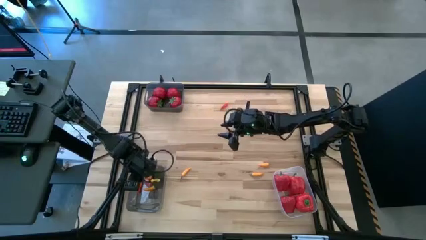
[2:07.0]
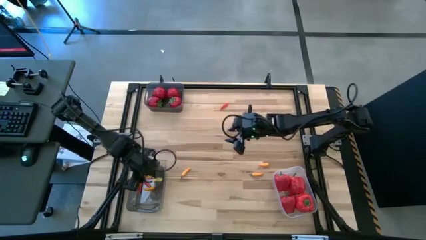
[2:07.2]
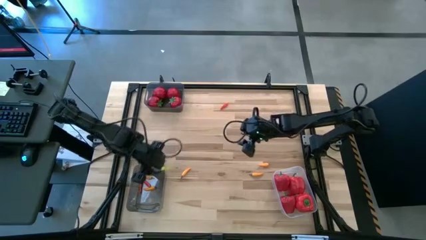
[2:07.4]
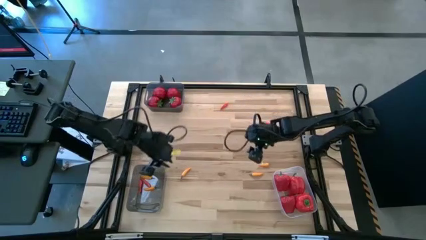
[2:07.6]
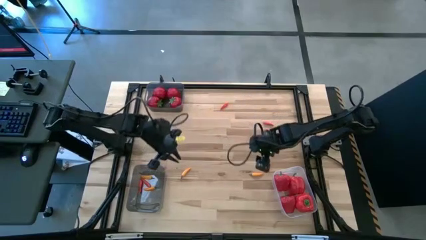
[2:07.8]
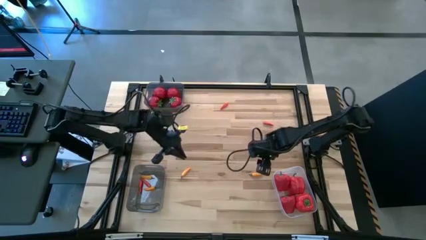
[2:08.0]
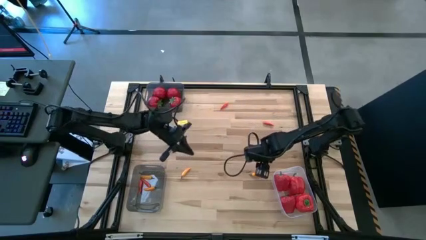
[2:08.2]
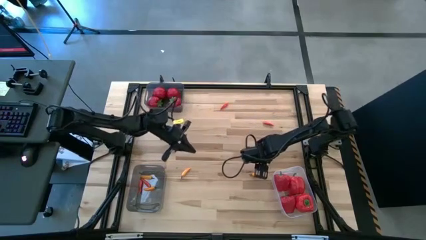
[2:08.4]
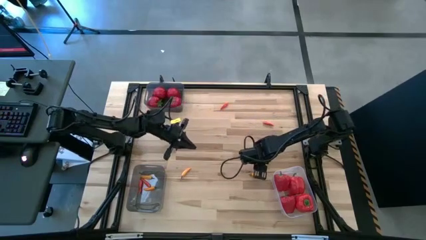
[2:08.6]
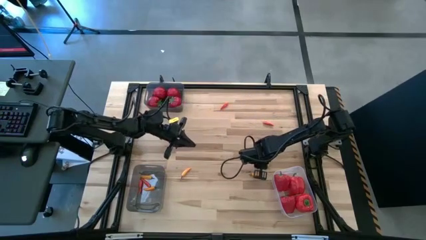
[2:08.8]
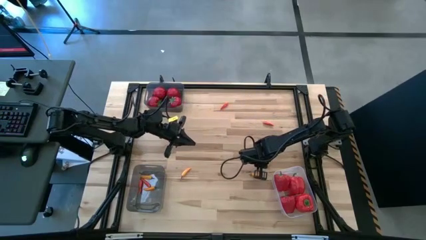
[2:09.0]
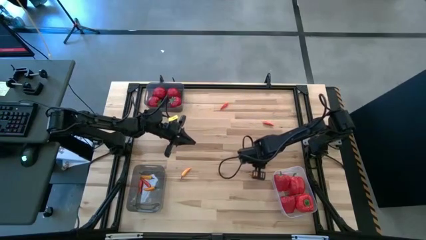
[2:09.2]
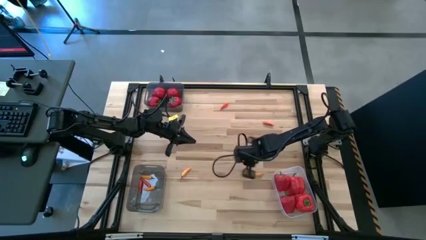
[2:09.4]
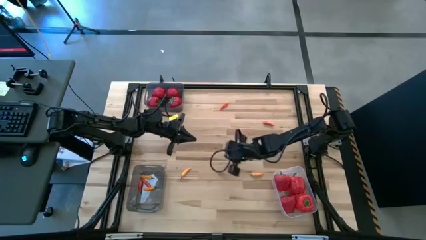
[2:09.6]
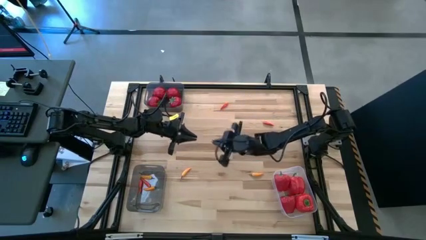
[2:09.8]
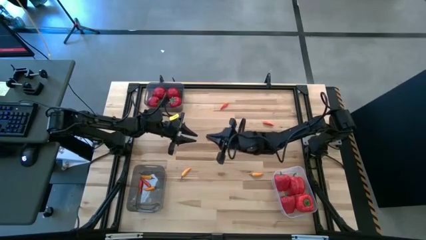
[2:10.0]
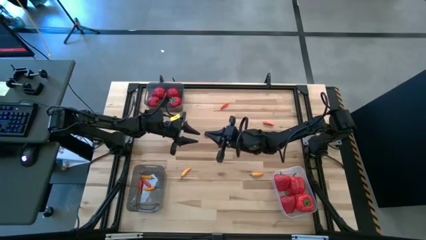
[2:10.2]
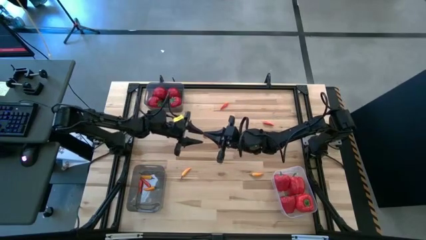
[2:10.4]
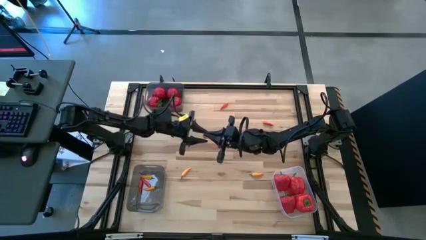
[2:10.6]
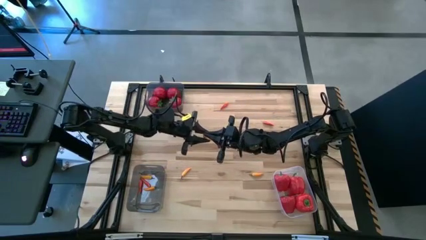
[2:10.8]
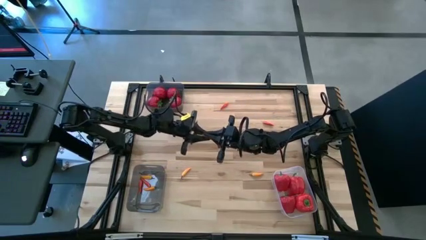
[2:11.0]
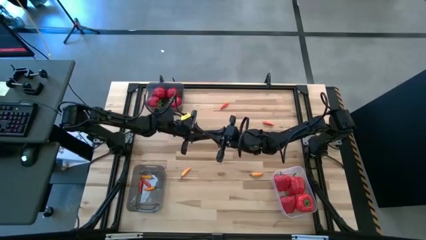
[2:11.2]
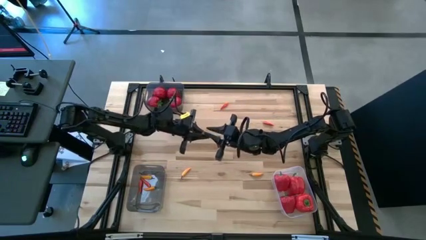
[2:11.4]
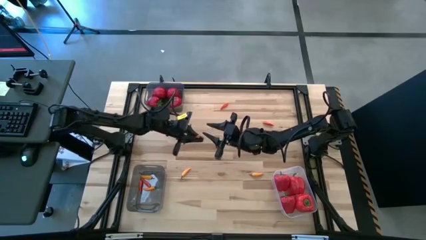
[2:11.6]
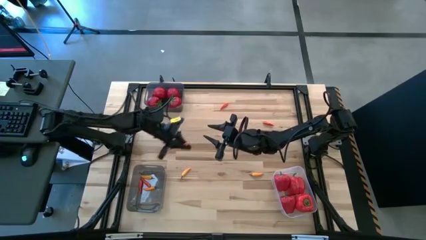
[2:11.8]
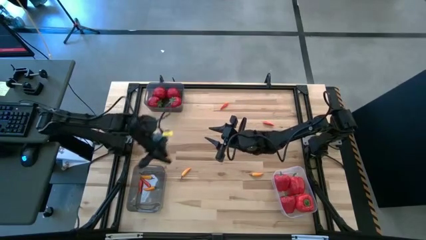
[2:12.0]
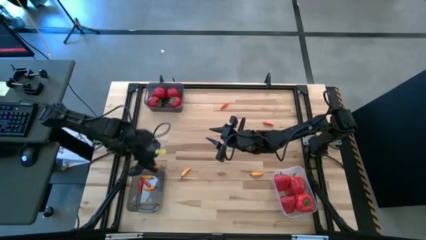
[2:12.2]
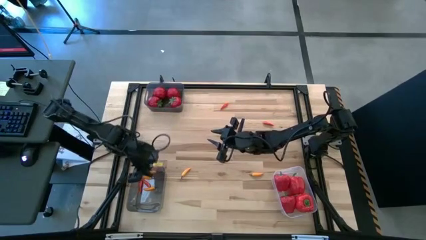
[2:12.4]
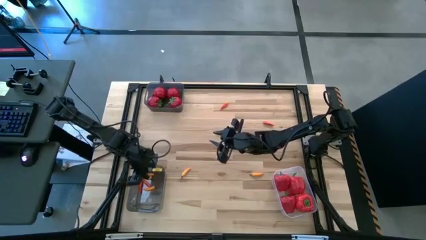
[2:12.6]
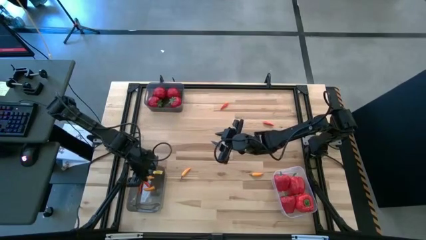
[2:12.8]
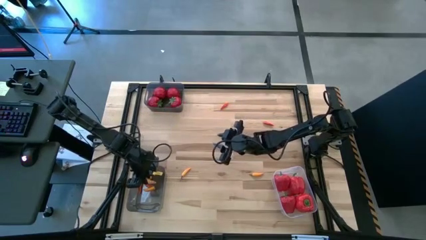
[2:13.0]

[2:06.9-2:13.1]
Task: Sort produce into baskets
Put the yellow chili pepper into the bottom black bin

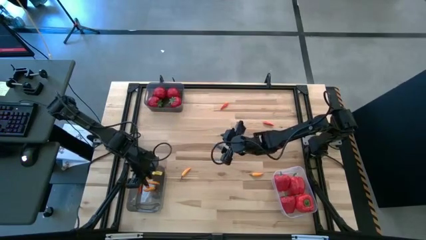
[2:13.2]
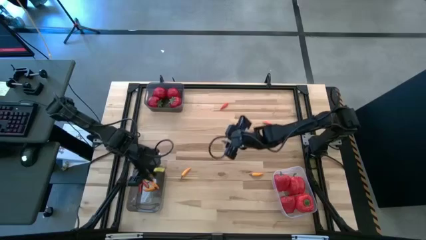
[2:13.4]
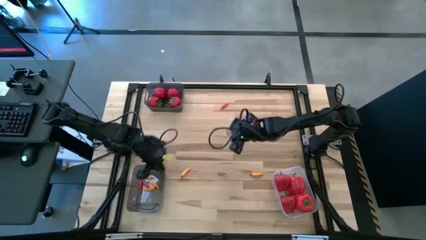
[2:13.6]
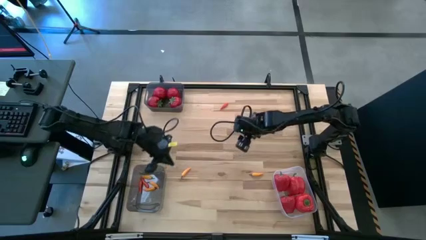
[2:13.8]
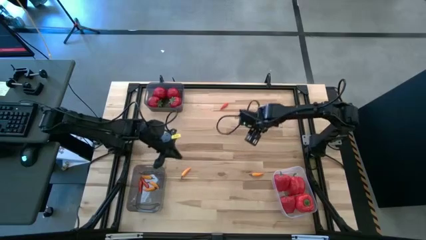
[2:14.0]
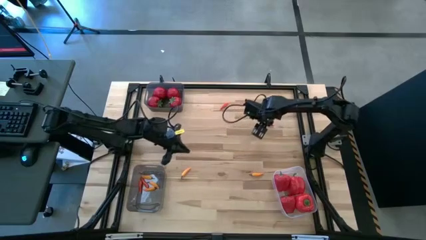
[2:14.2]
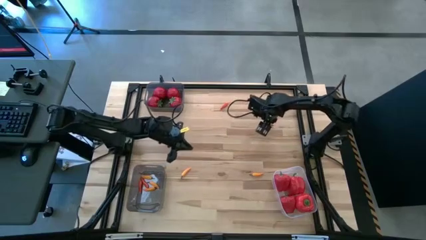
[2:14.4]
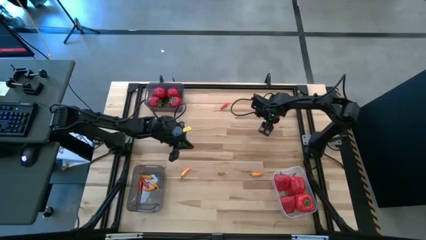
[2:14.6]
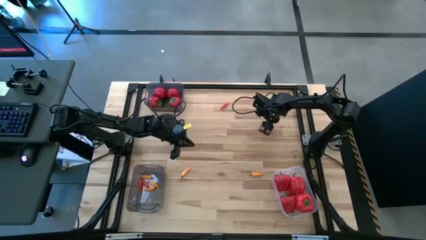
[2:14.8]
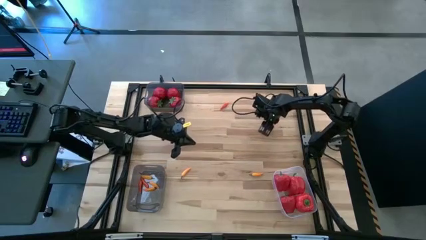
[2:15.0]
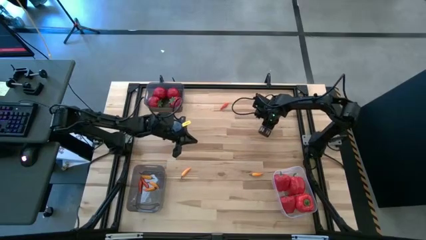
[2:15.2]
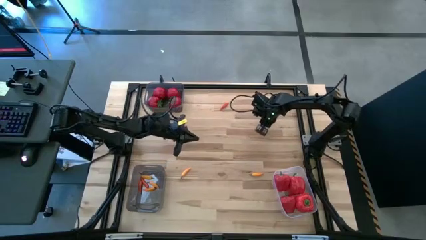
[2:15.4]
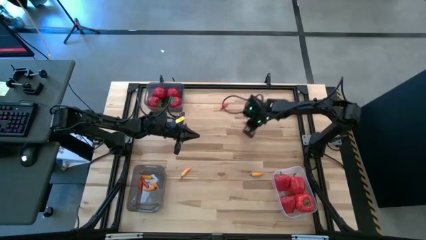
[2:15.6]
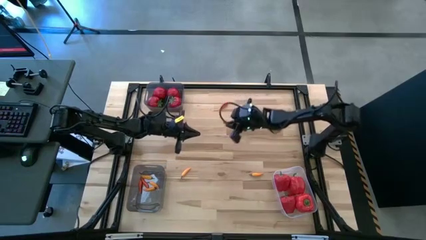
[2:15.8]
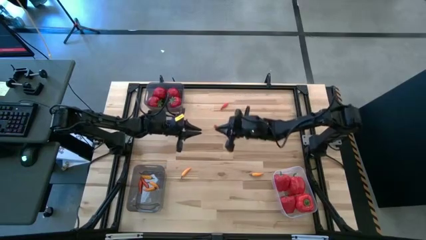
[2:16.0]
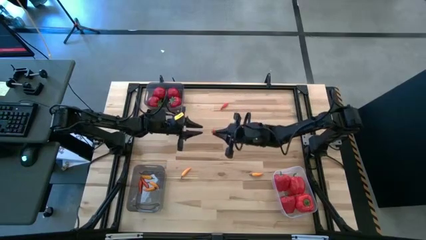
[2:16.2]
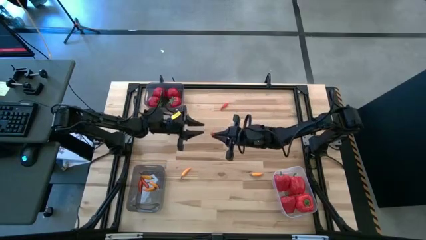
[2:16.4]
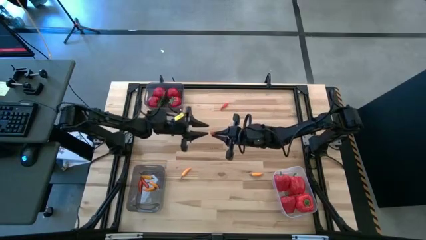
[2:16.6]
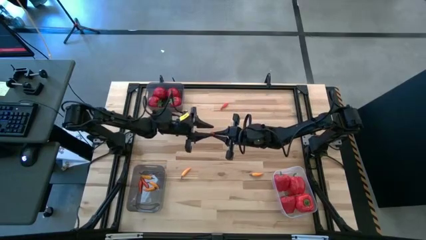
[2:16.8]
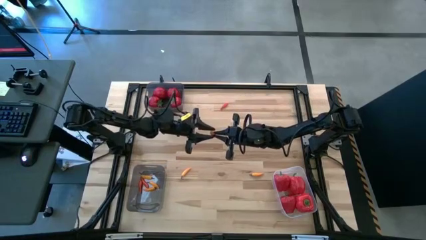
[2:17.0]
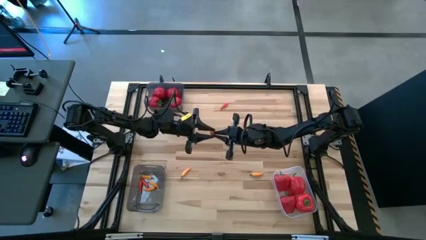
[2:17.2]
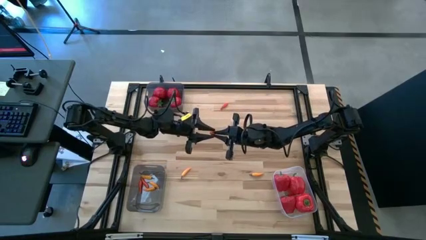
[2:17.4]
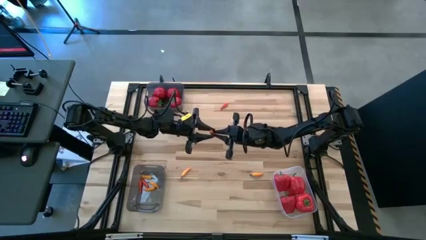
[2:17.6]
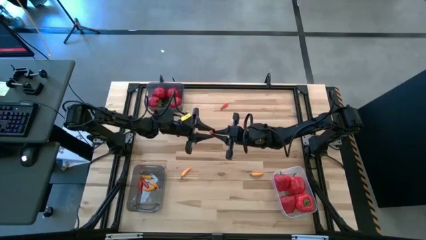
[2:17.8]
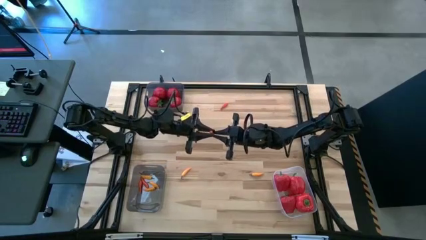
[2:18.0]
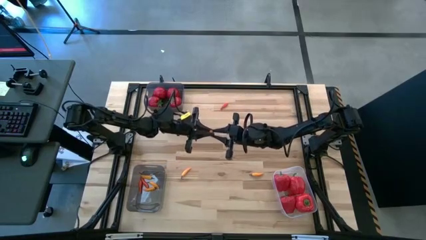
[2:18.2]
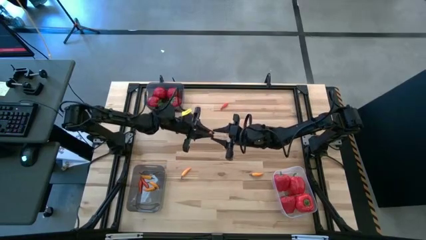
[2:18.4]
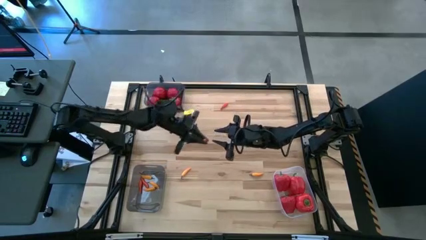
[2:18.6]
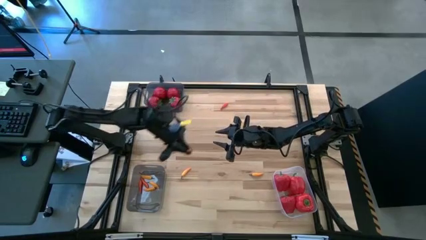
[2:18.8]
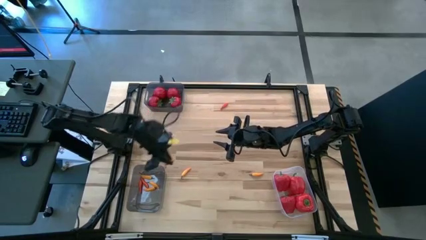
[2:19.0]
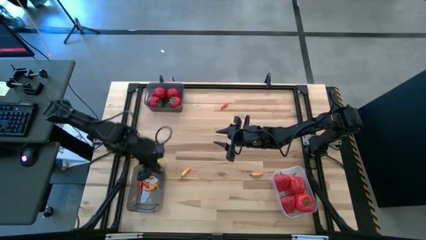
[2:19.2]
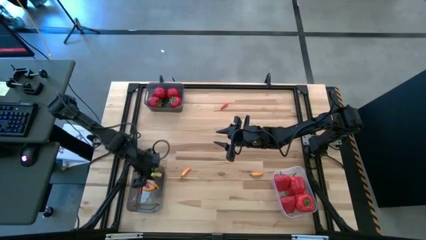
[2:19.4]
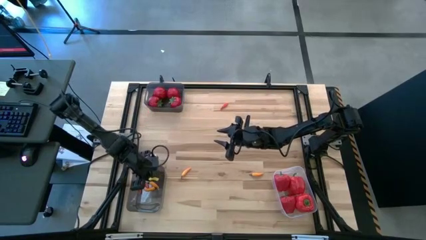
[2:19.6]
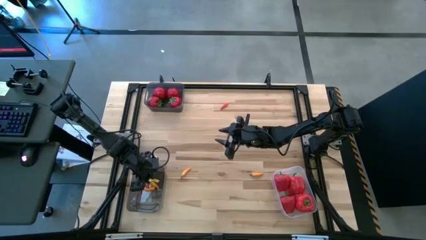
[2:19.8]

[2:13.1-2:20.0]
Put the orange chili pepper into the bottom black bin

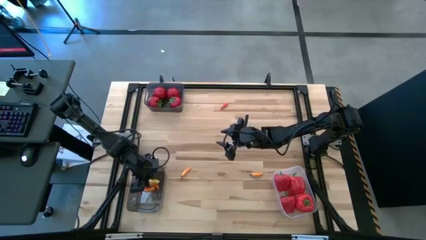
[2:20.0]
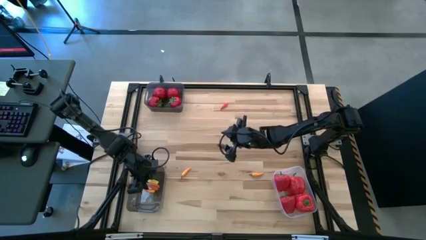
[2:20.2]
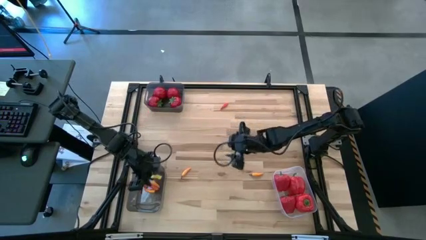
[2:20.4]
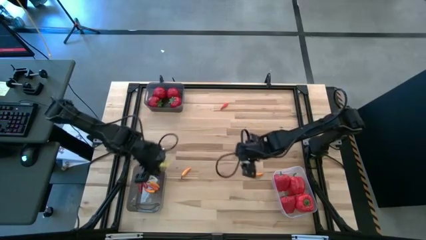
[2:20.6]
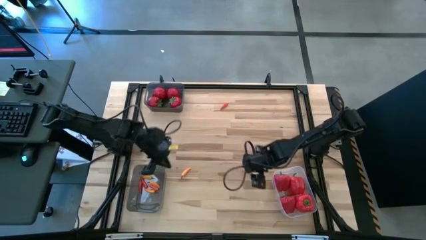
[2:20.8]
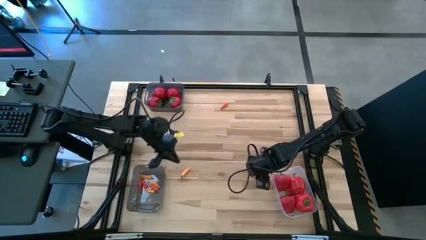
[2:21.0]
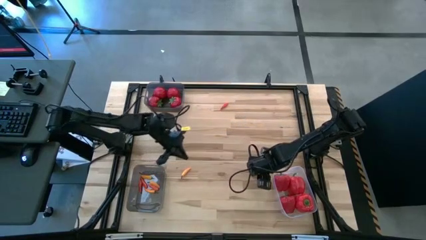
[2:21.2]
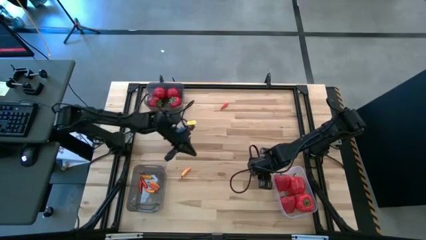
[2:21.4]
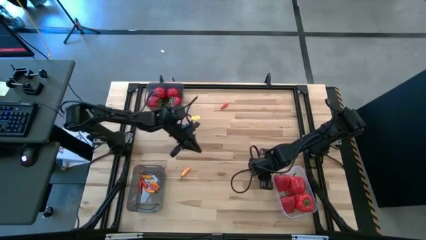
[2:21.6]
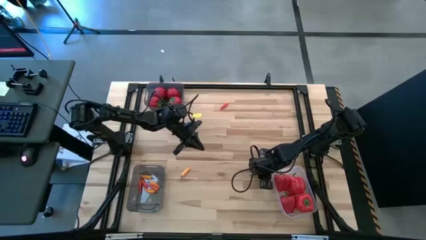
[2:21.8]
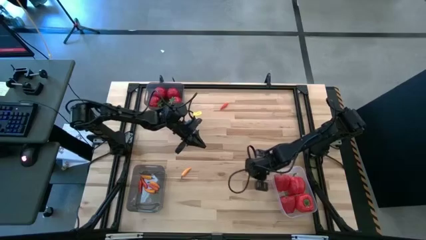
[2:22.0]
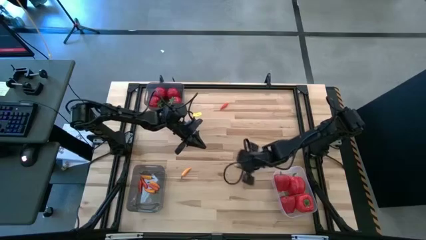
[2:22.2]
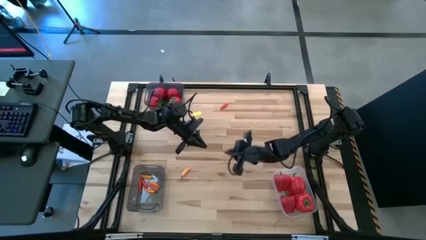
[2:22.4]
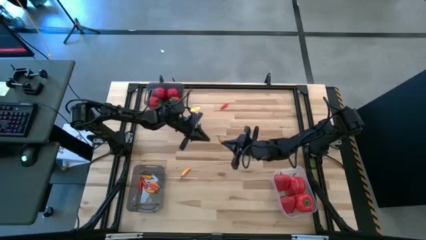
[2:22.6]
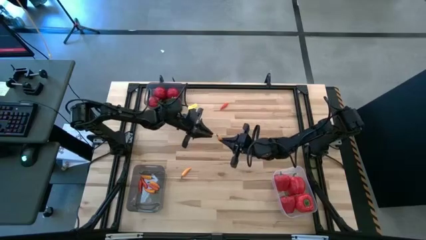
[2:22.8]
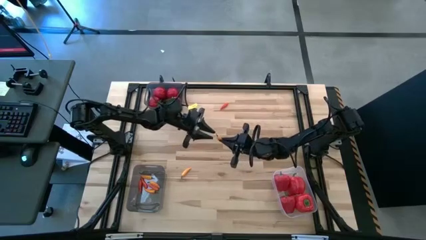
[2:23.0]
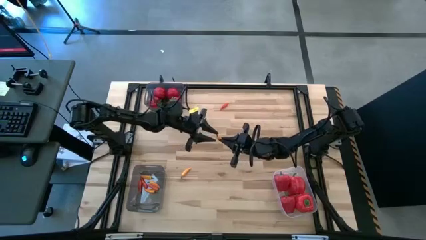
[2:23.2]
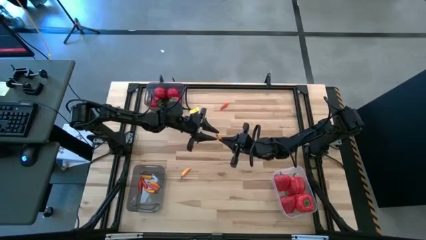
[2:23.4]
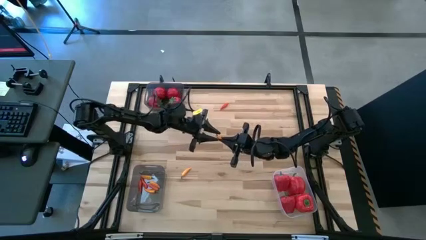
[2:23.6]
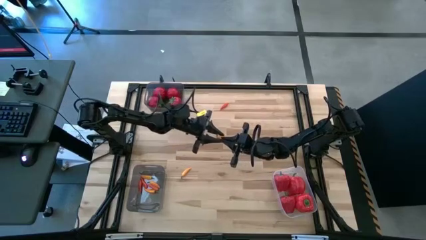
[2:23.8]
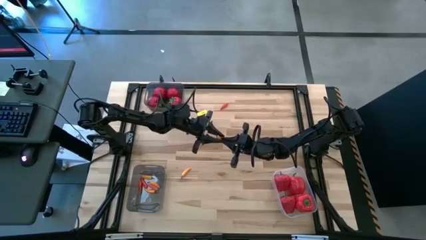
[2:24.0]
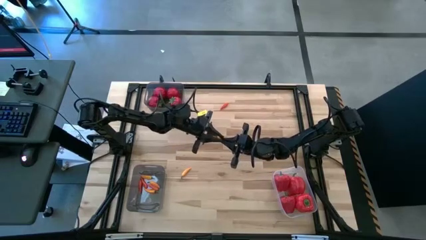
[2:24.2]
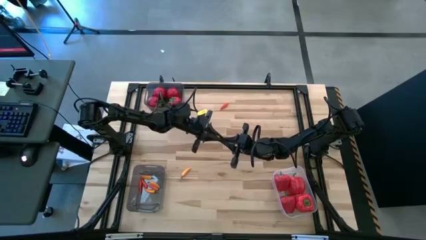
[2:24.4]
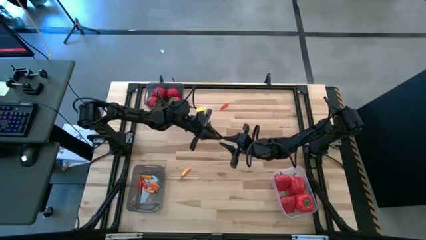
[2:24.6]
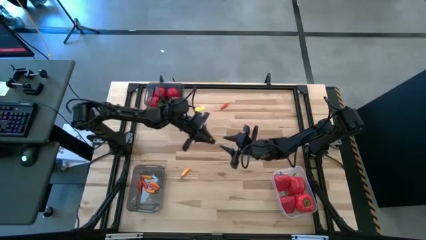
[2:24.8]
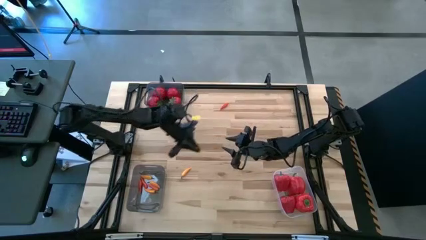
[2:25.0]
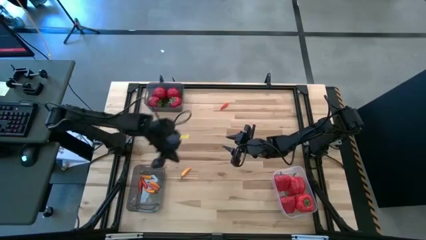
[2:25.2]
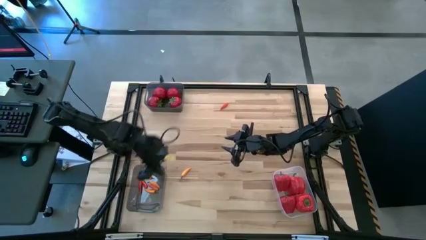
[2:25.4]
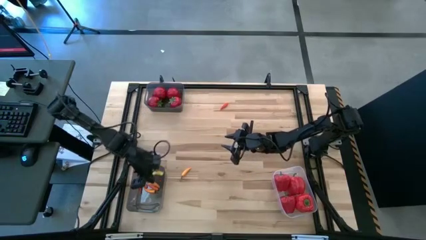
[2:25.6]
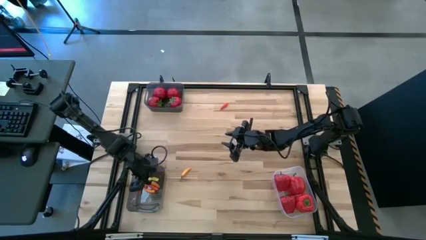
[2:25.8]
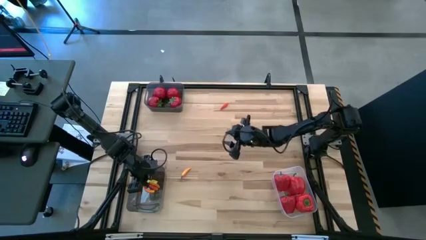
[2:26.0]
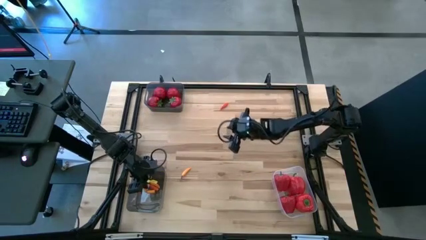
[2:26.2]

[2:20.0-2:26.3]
Put the yellow chili pepper into the bottom black bin
